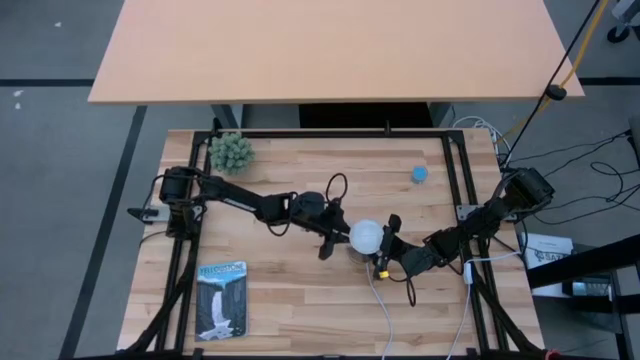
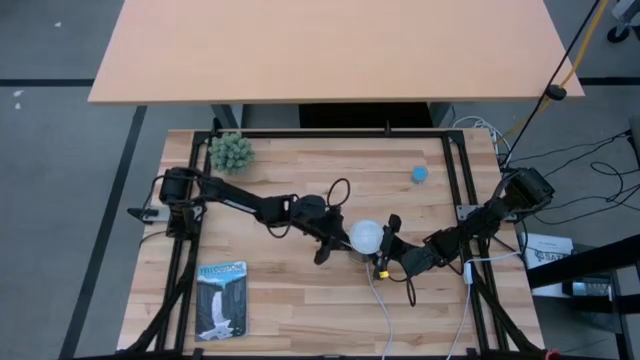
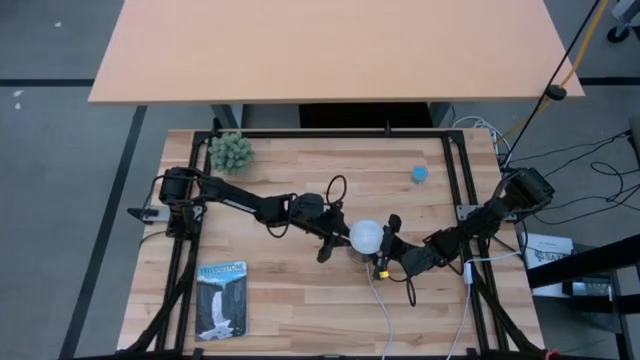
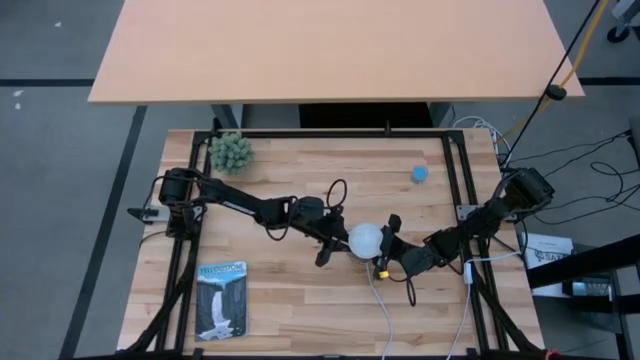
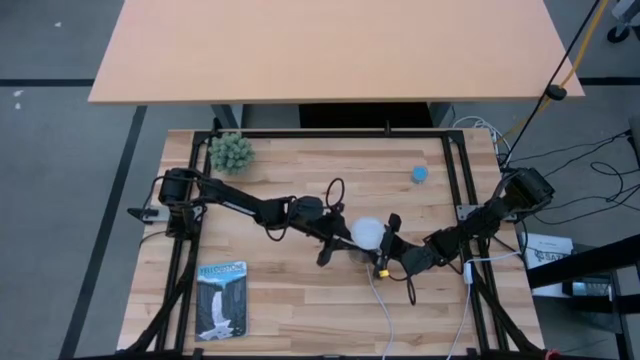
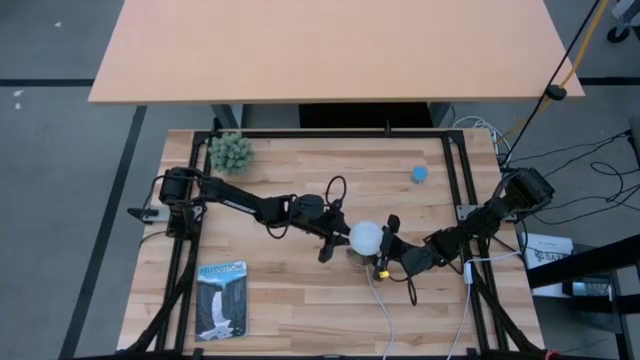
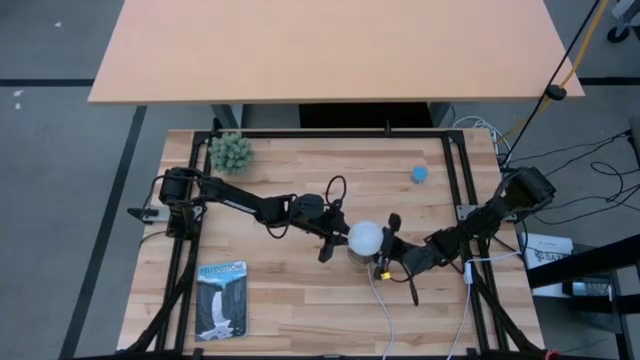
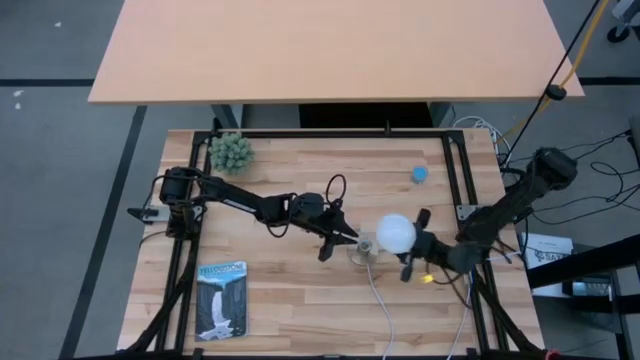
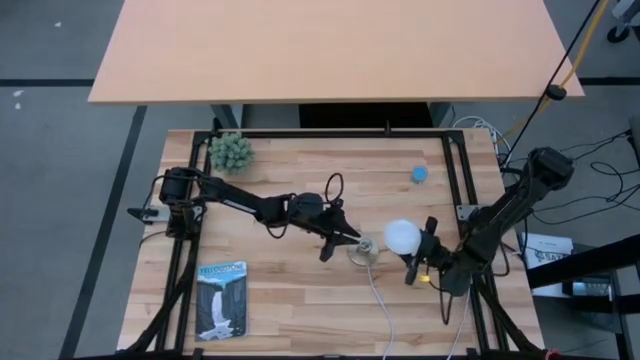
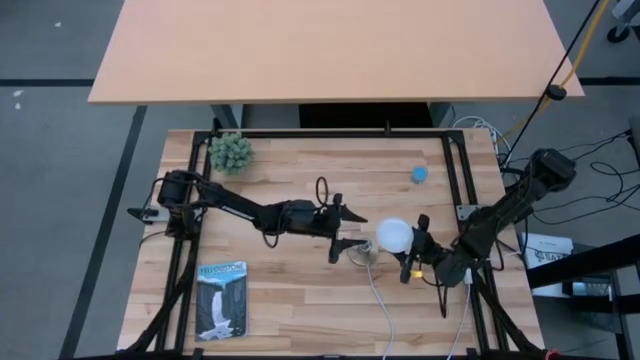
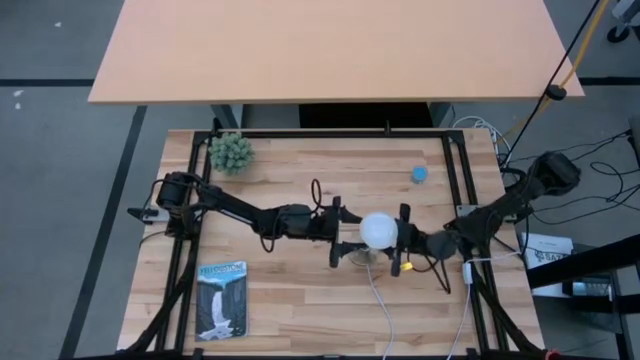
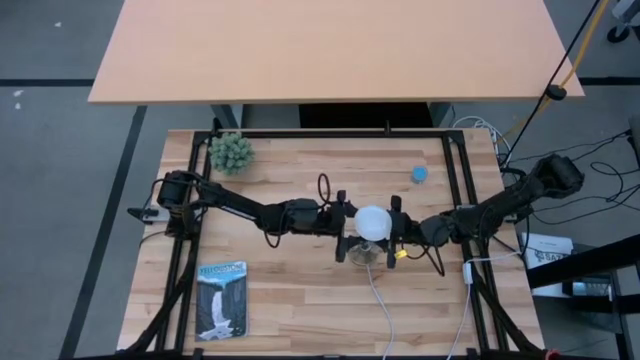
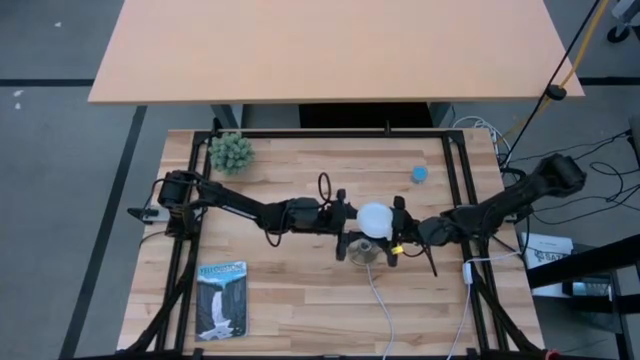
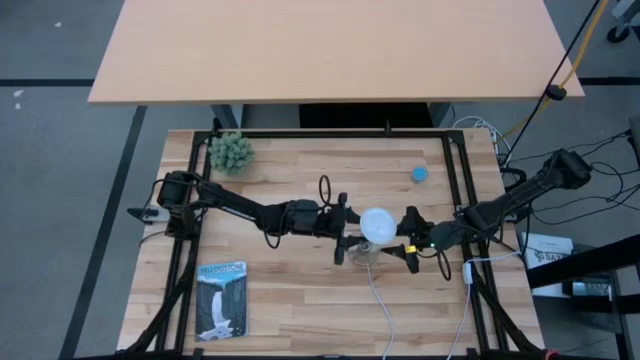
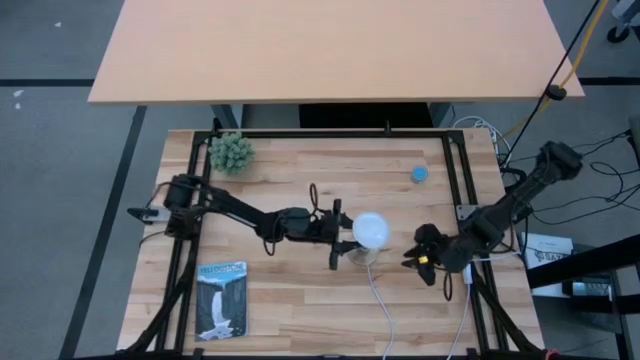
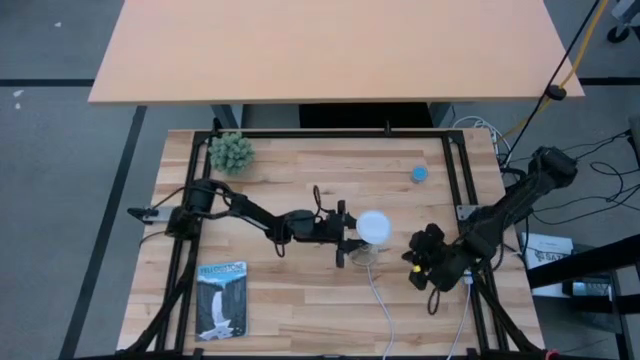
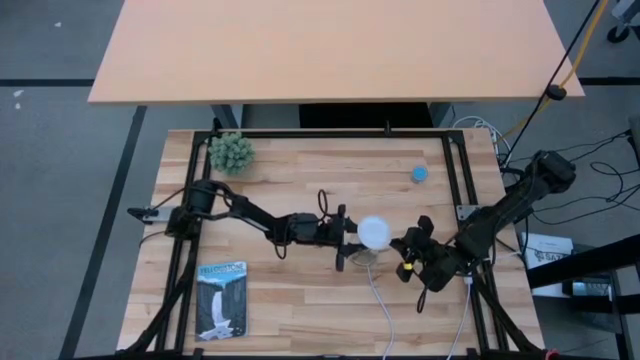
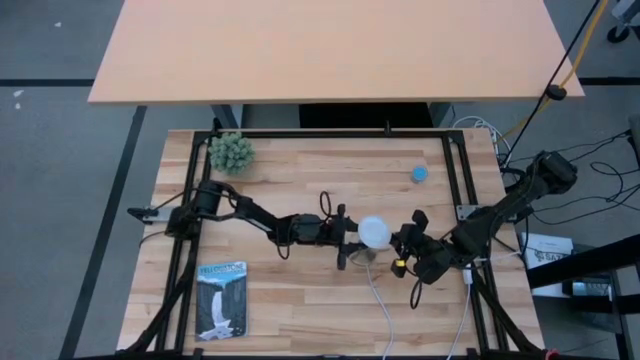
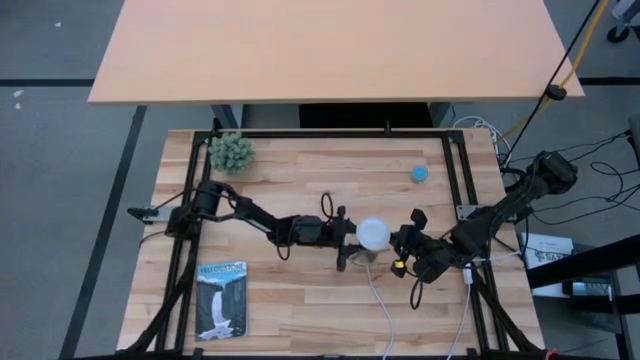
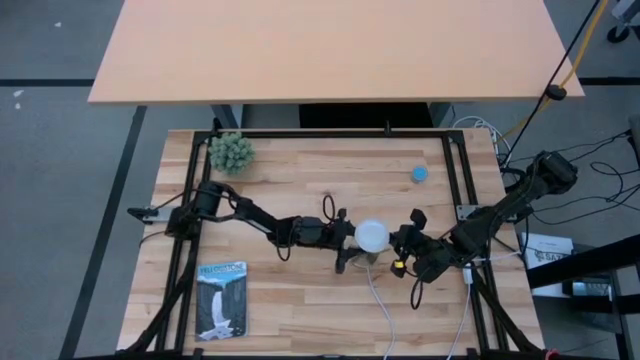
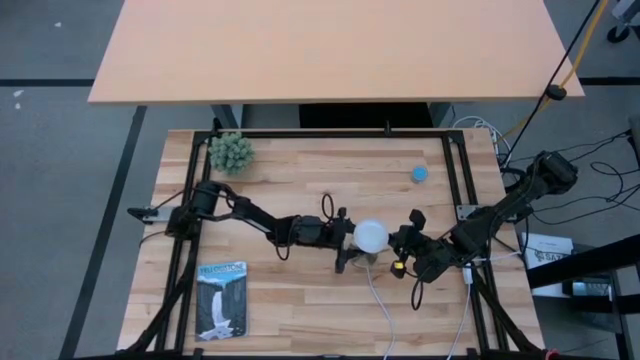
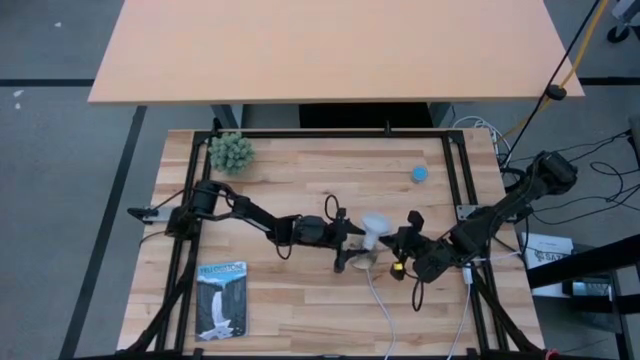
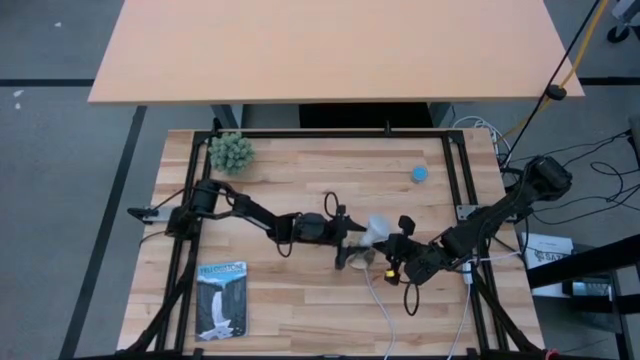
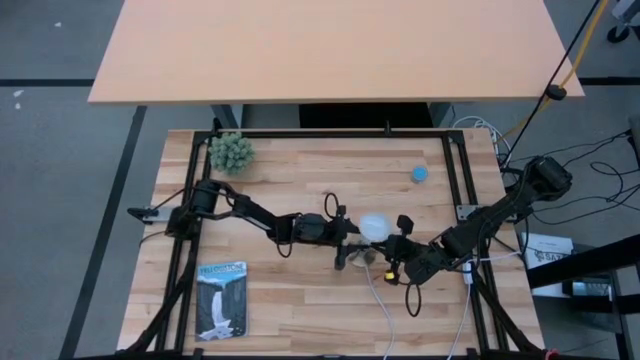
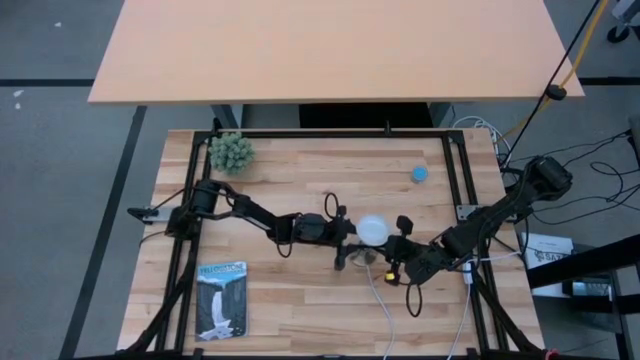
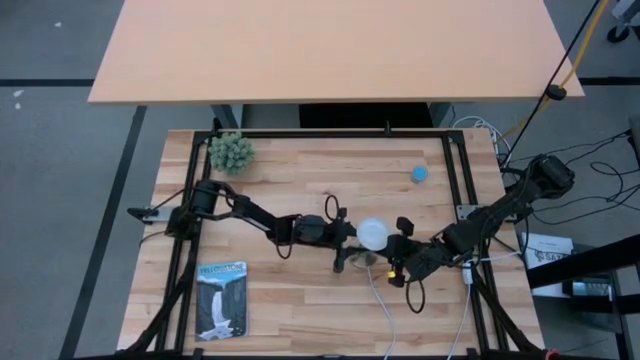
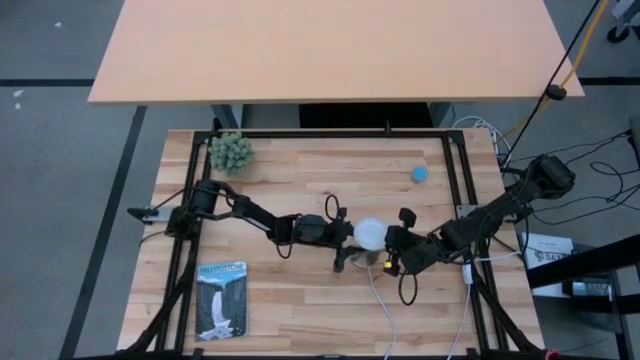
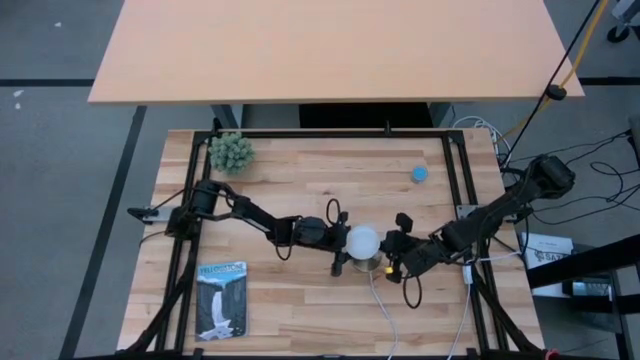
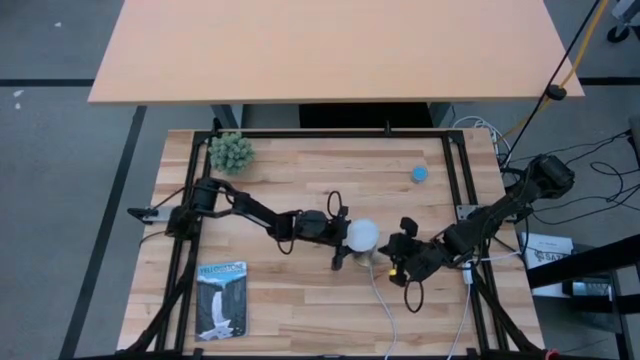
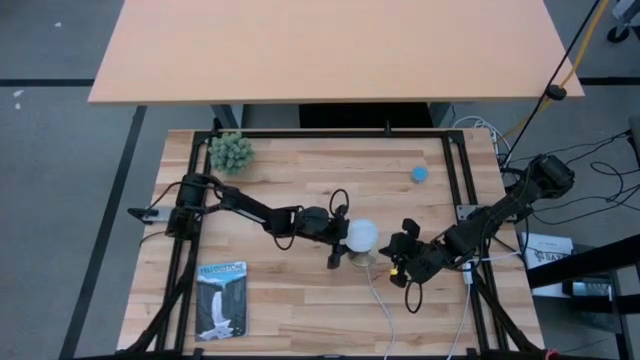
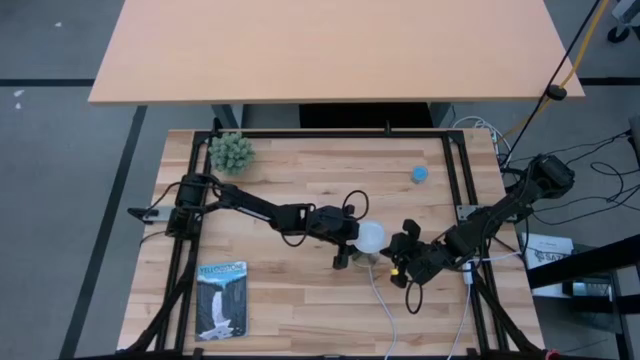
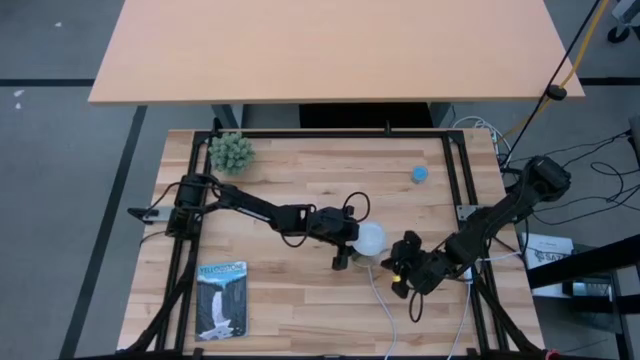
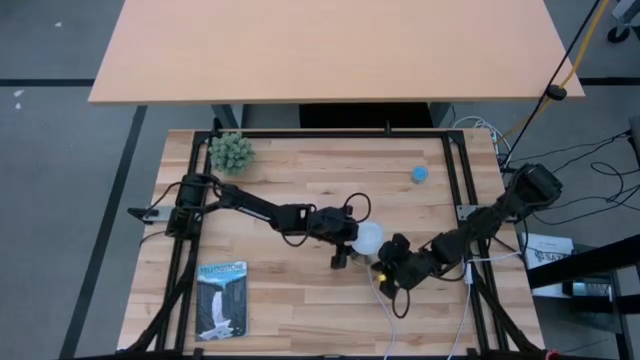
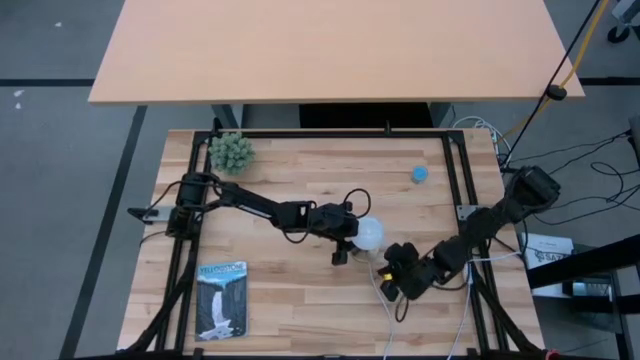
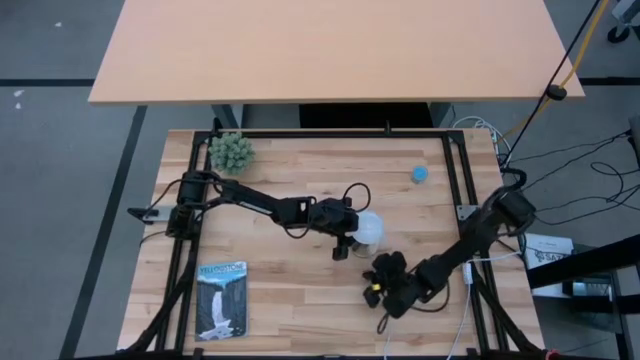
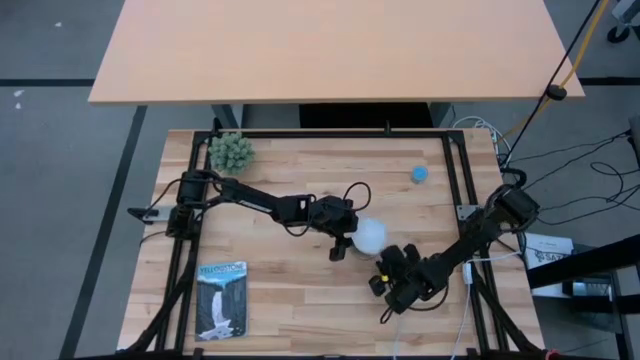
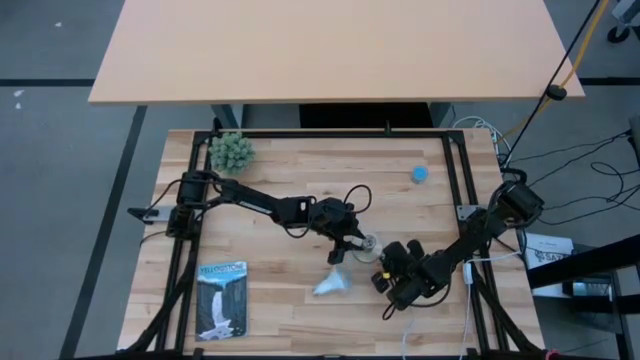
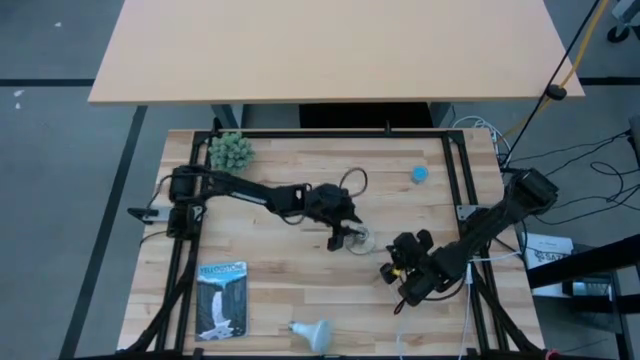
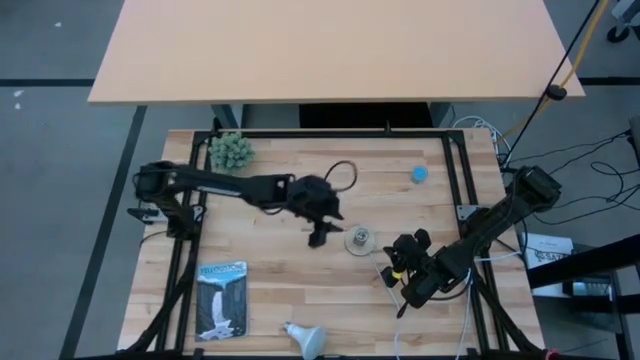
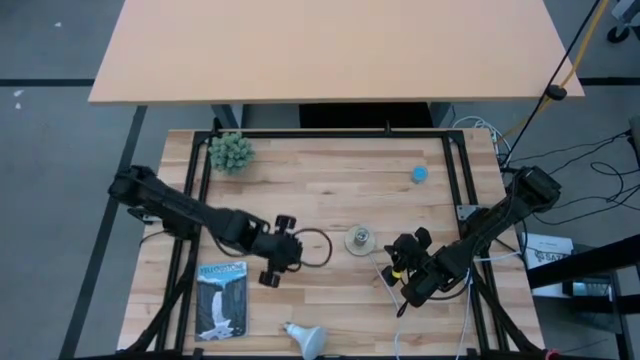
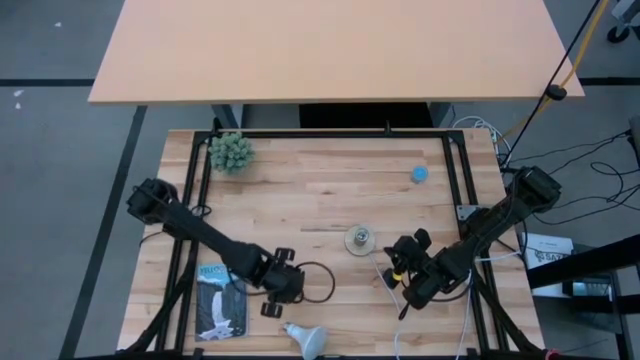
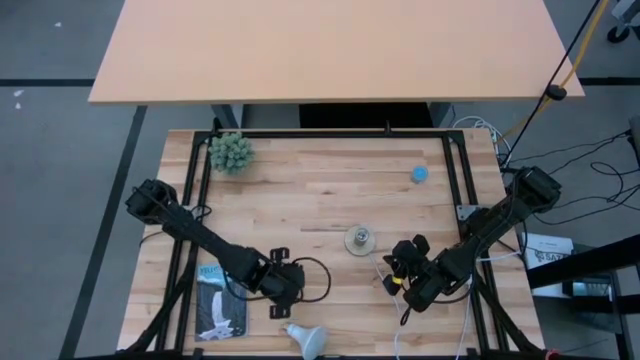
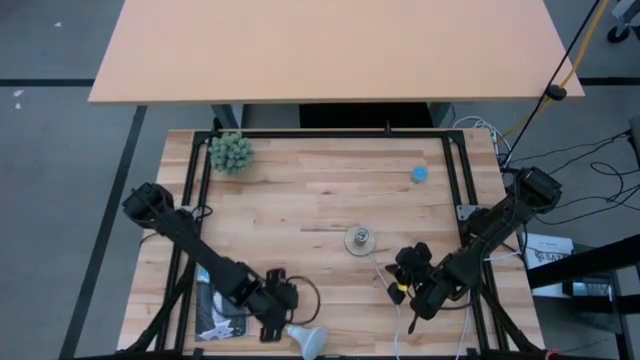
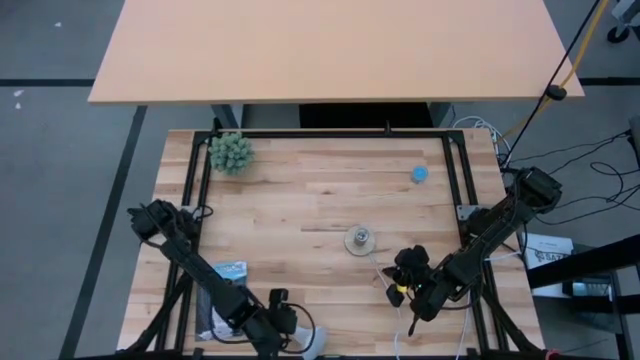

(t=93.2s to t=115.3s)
Task: Screw lightbulb
Insert the lightbulb into the desk lamp
